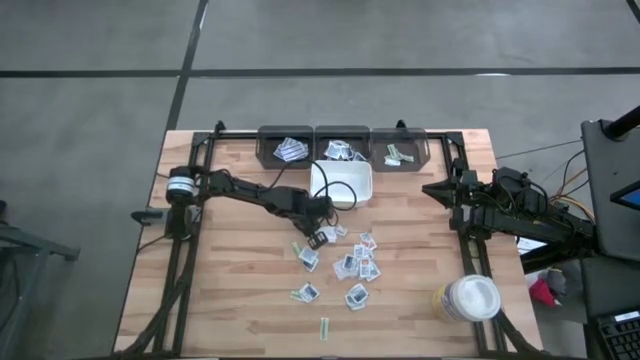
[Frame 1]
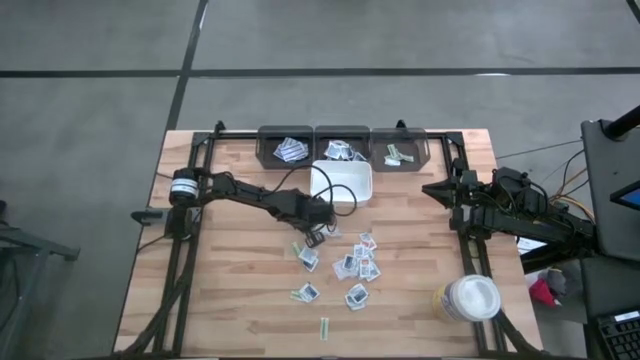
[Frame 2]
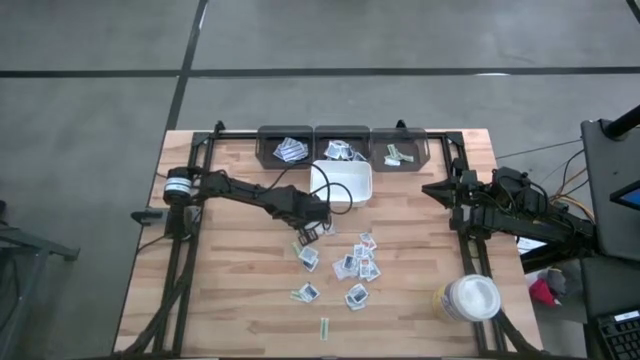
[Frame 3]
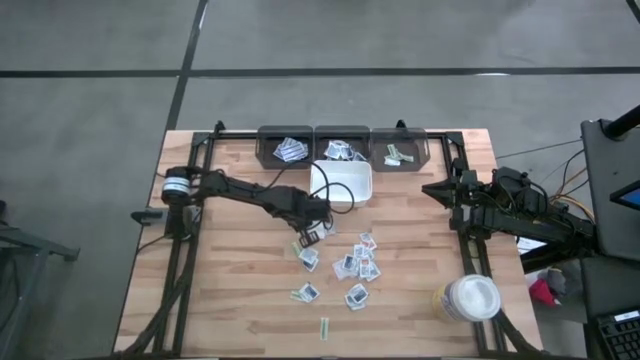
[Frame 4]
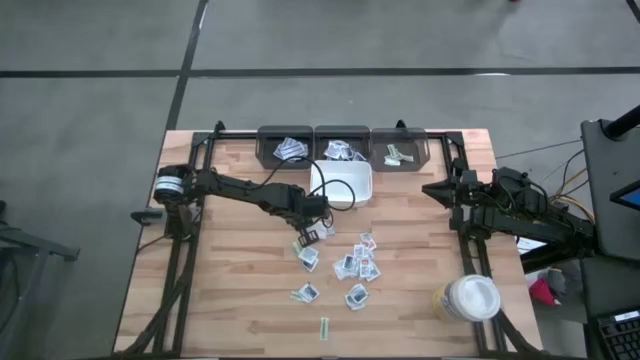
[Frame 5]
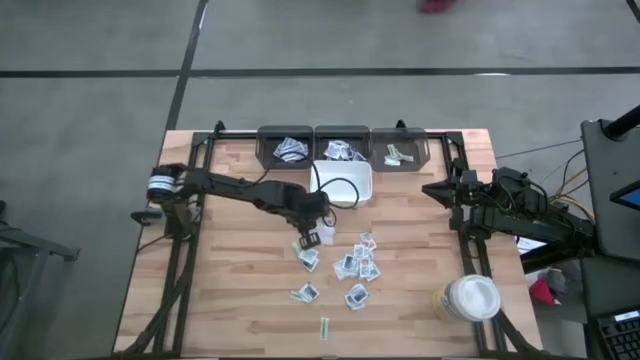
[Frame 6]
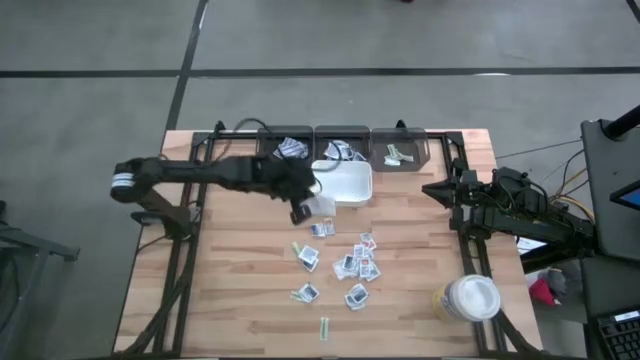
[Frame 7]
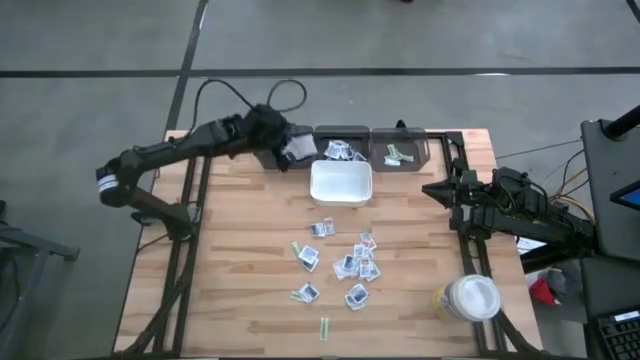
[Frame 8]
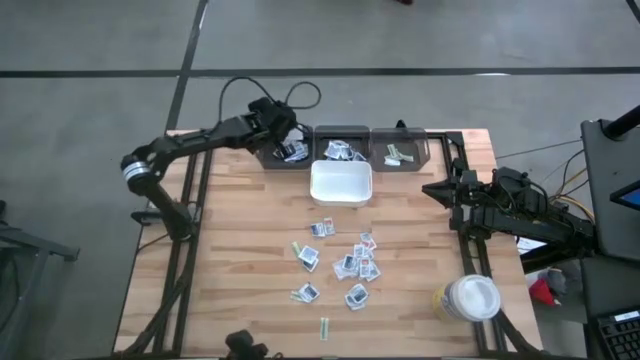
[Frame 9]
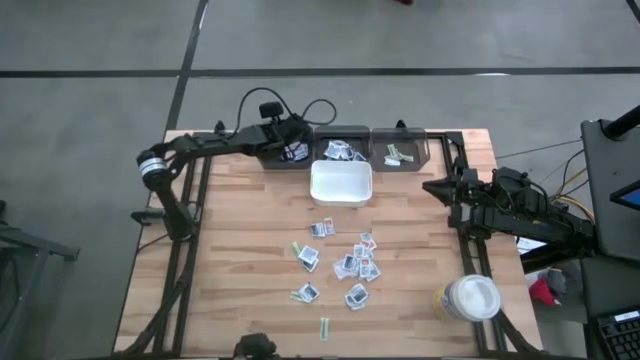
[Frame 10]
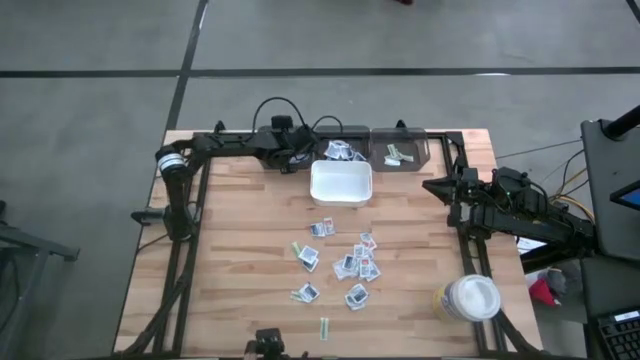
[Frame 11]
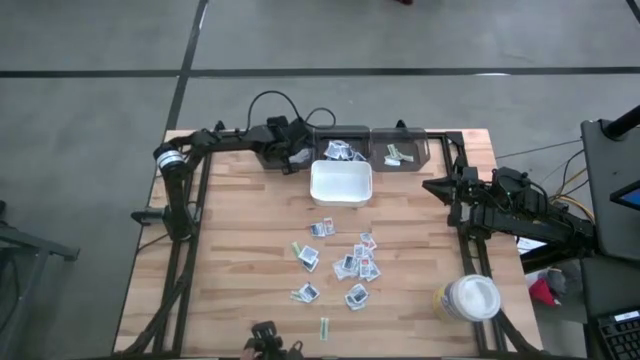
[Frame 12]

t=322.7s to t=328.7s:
Task: Pick & Place First Aid Supplies
Put the top blue bandage pack into the left gray bin

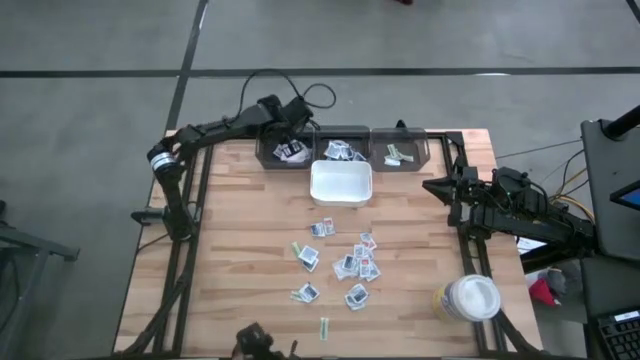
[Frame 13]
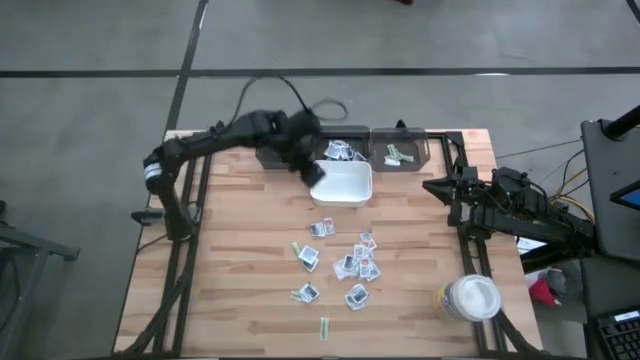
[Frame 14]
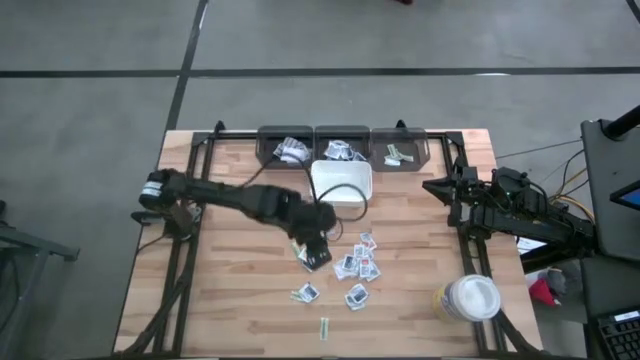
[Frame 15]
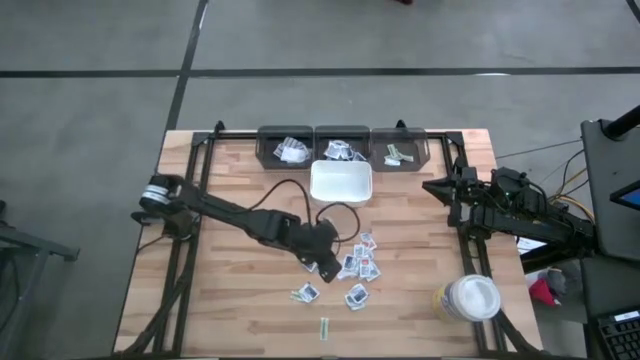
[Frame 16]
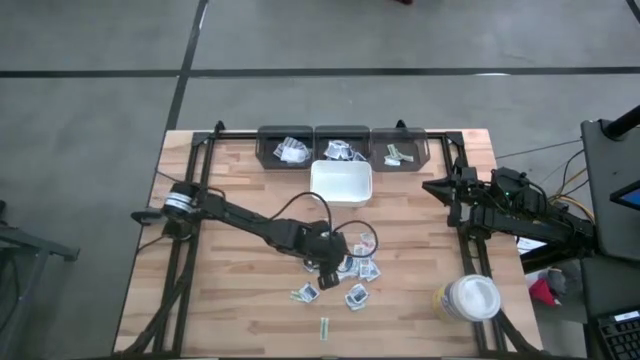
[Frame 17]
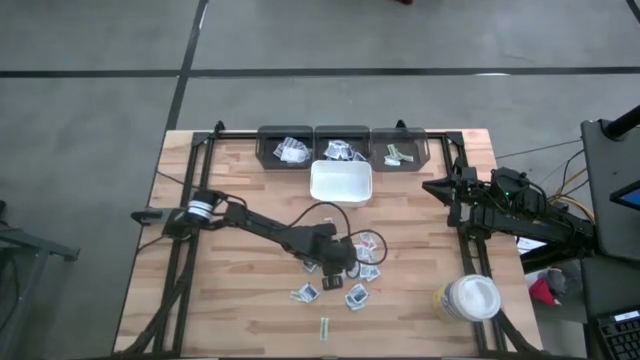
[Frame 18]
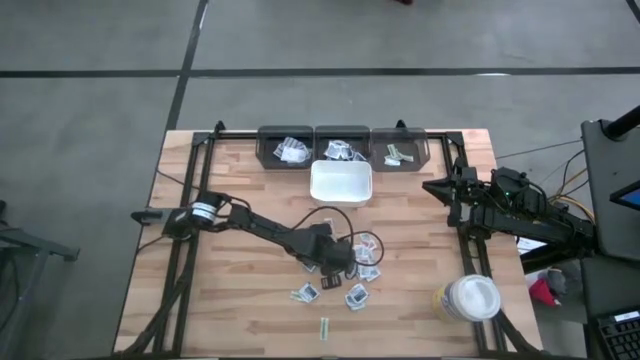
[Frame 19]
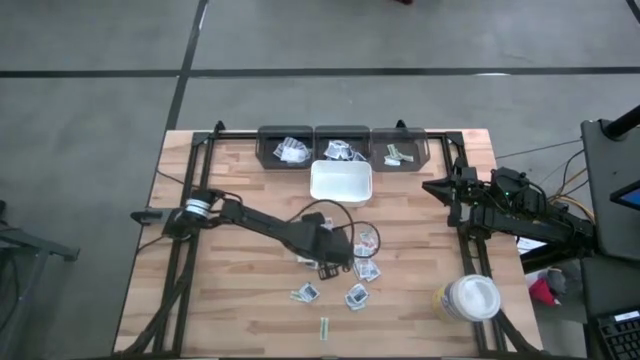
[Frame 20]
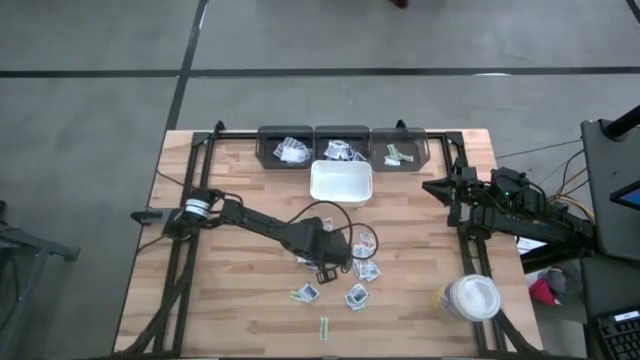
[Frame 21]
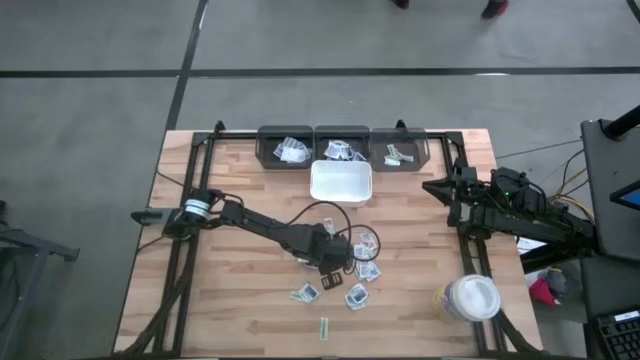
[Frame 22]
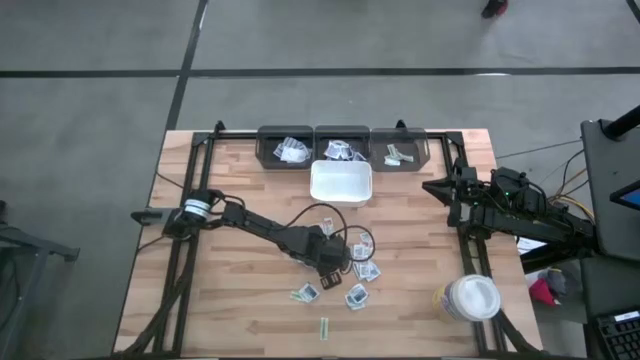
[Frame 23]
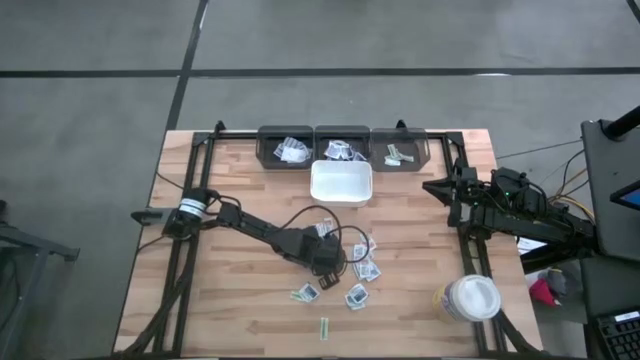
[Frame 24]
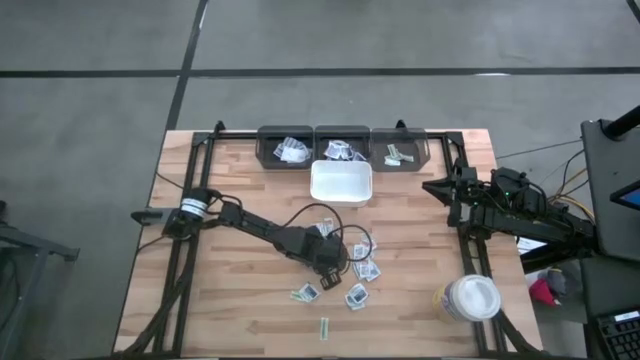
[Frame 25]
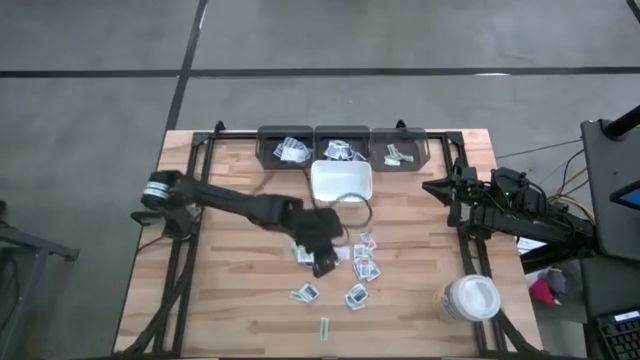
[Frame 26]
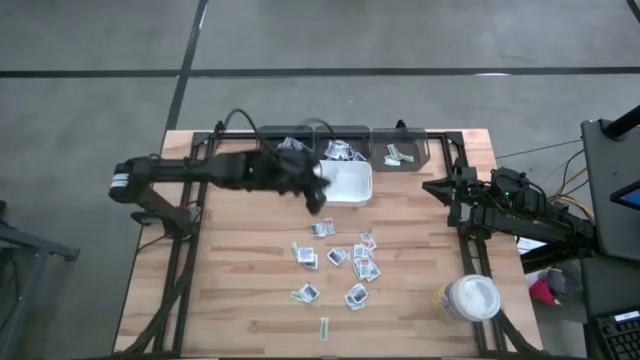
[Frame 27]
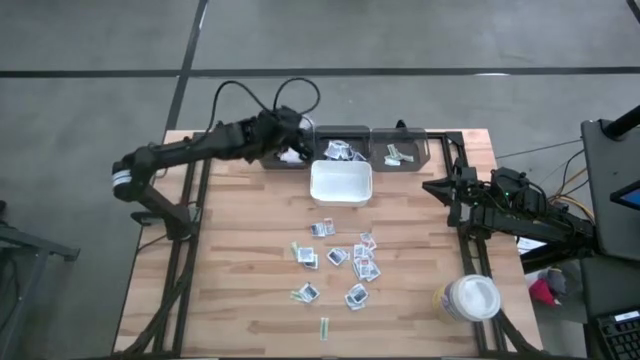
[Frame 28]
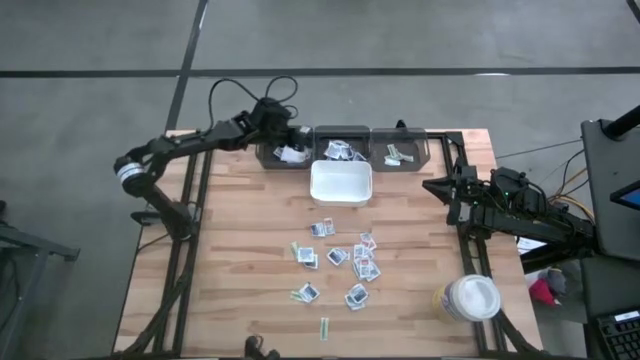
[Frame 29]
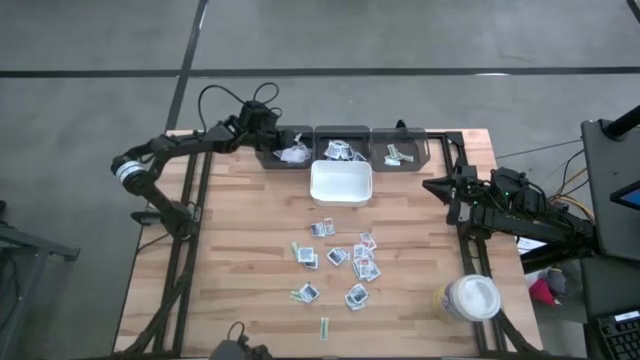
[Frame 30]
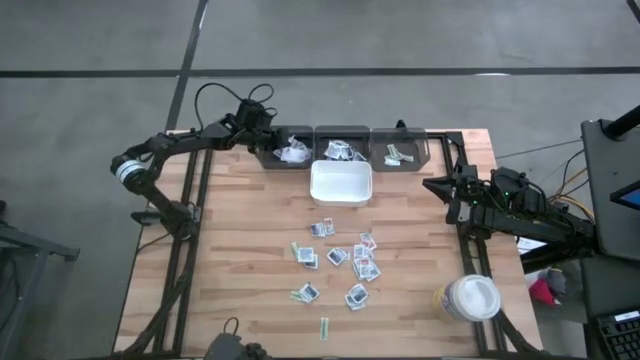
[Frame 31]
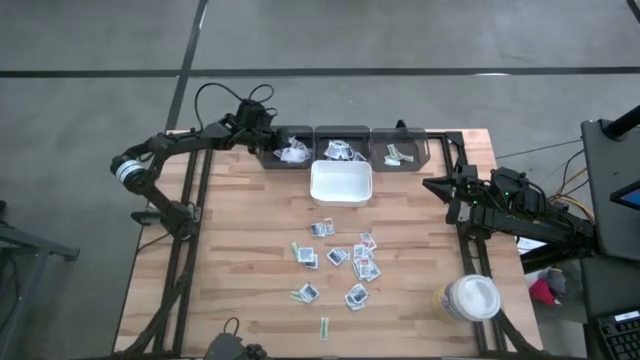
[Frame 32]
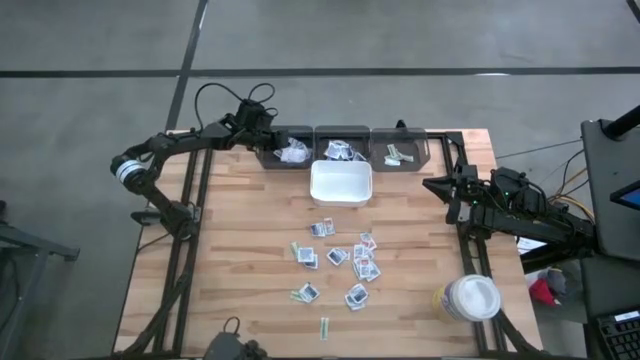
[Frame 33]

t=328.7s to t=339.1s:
Put the blue bandage pack into the left gray bin

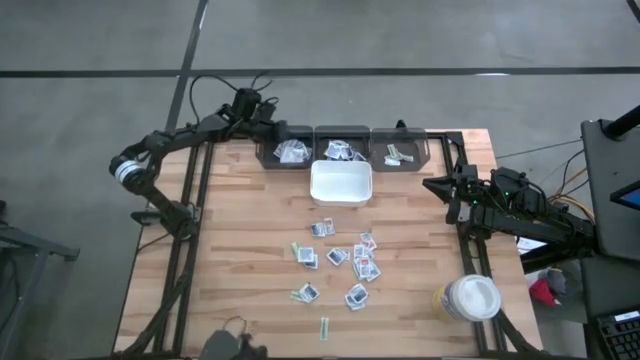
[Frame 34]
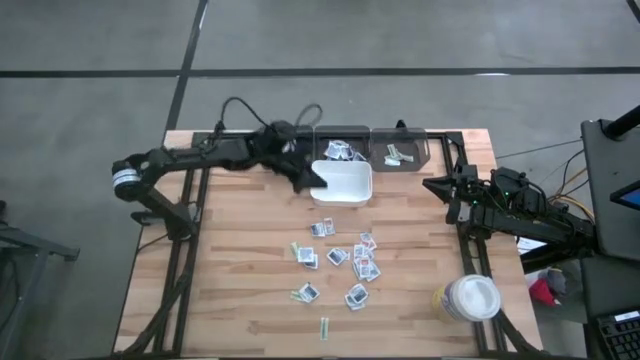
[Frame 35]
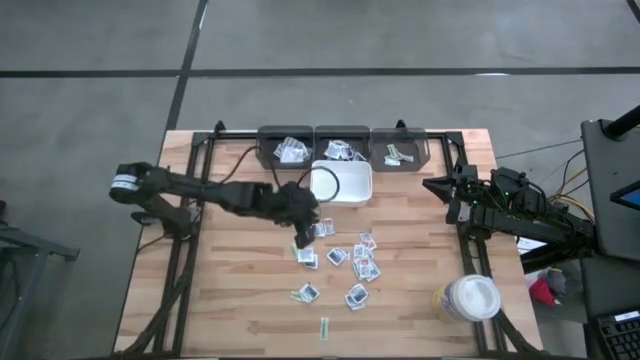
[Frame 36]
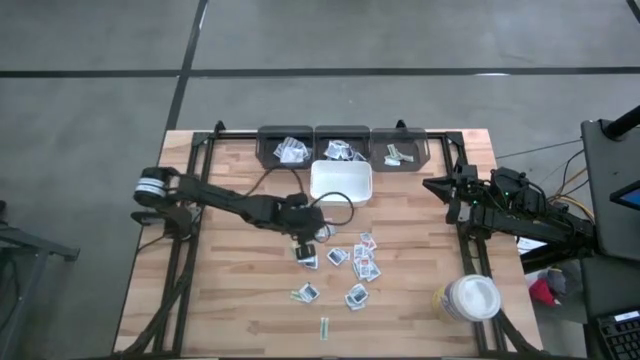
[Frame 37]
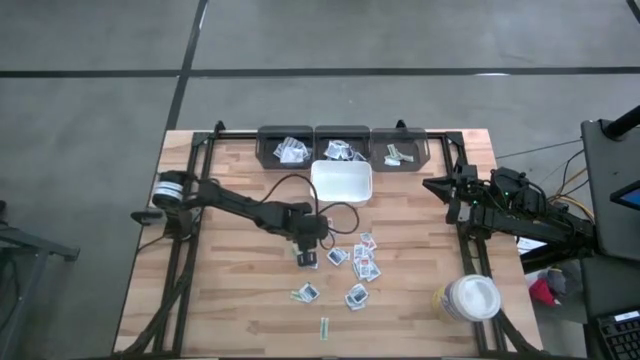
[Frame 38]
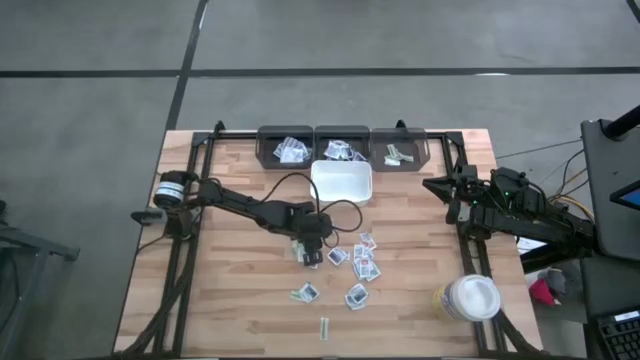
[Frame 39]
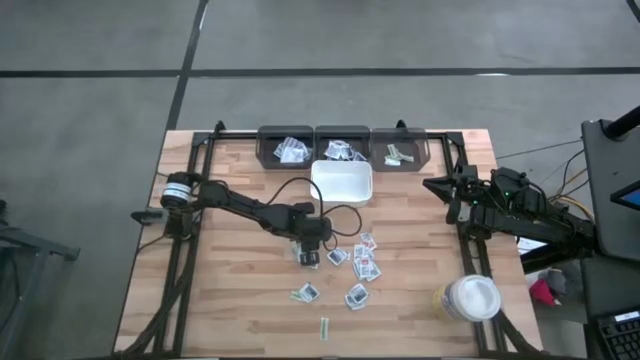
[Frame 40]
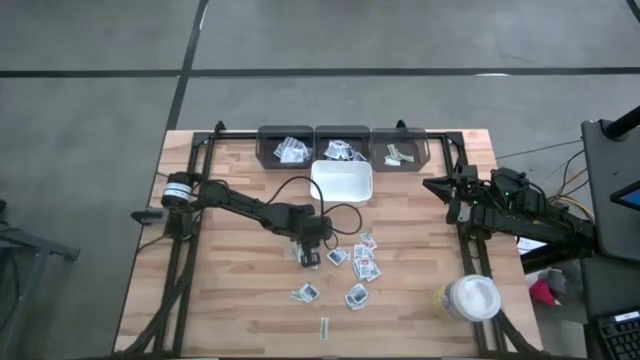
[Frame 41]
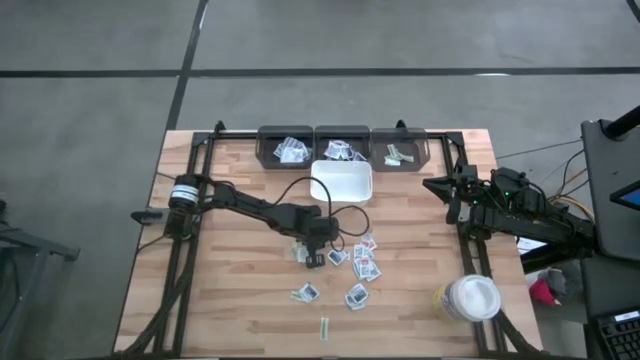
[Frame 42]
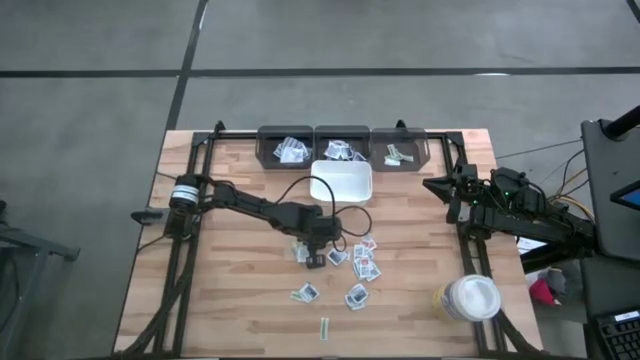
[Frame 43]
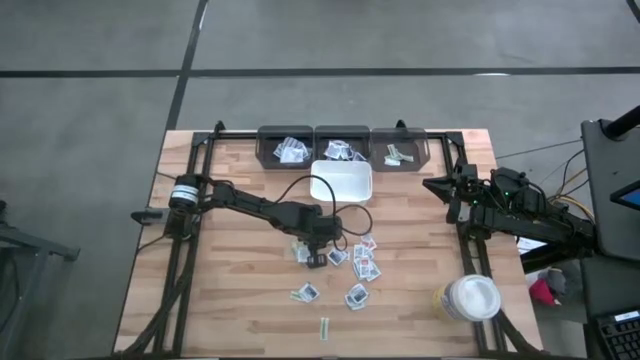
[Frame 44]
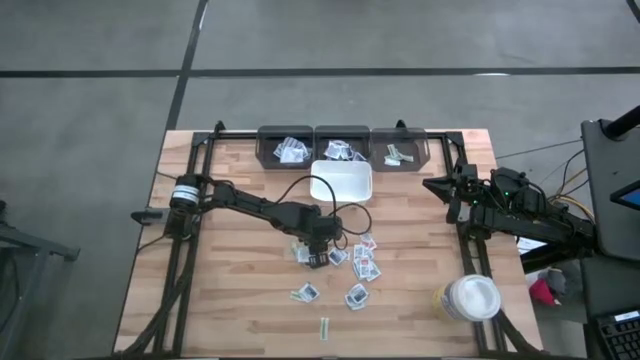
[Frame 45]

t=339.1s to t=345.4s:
Put the blue alcohol pad into the middle gray bin
